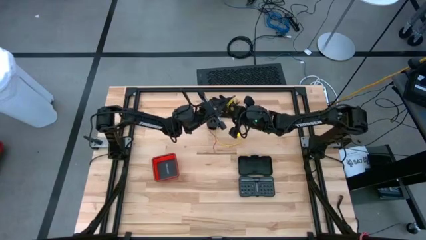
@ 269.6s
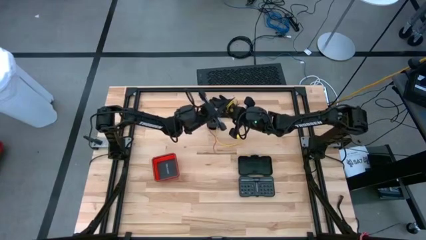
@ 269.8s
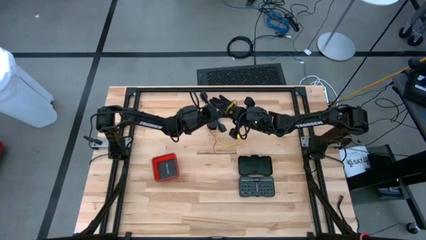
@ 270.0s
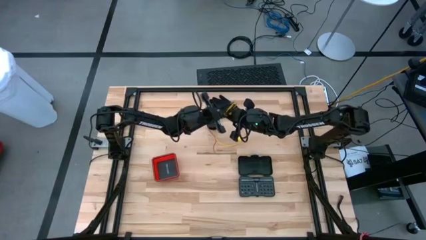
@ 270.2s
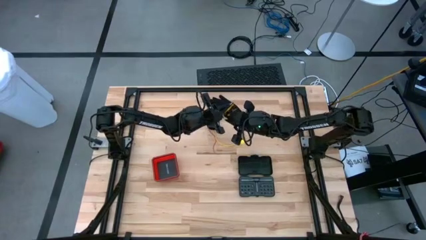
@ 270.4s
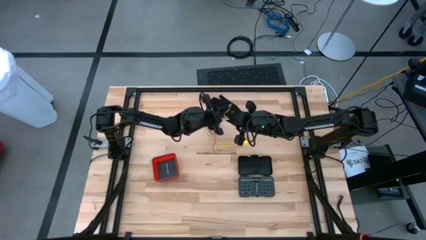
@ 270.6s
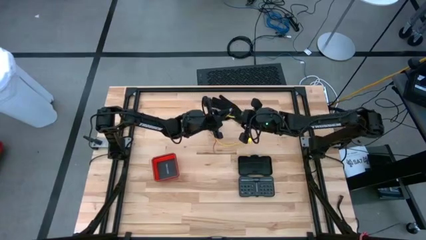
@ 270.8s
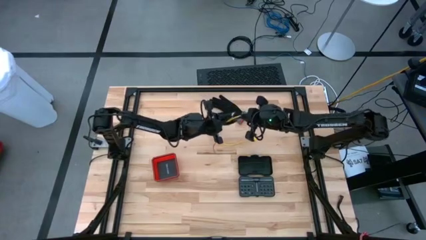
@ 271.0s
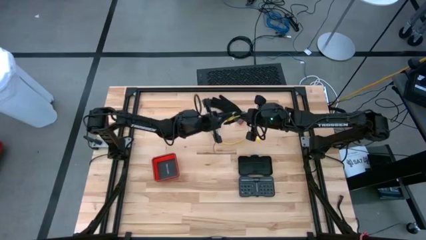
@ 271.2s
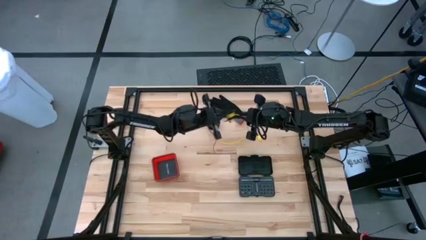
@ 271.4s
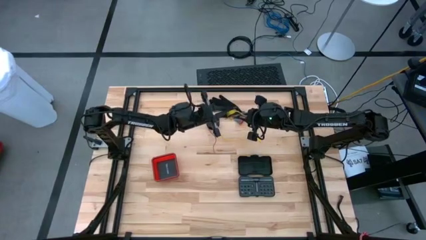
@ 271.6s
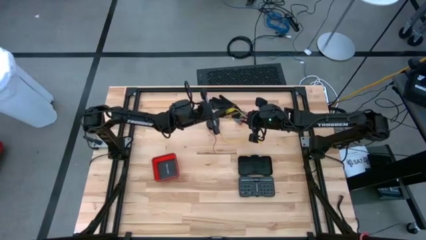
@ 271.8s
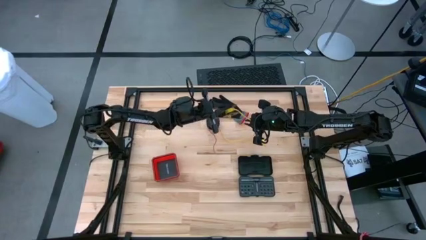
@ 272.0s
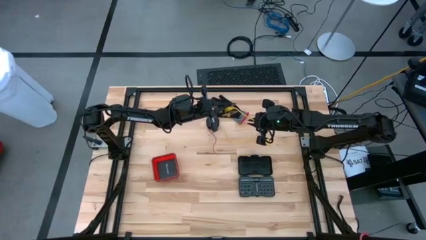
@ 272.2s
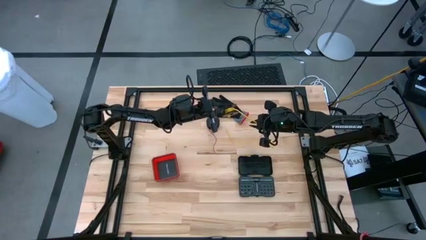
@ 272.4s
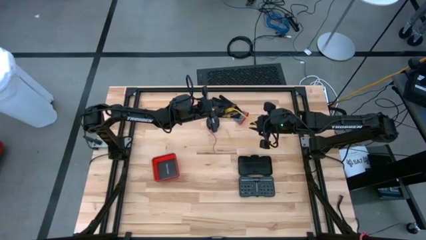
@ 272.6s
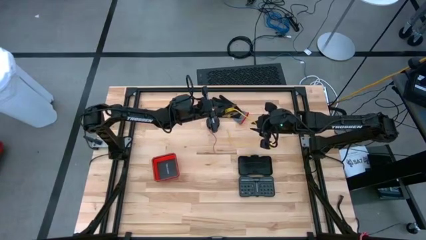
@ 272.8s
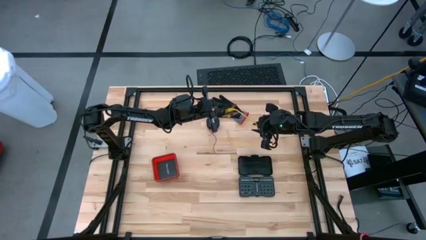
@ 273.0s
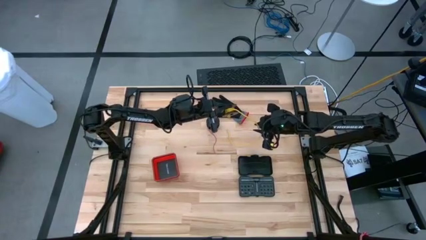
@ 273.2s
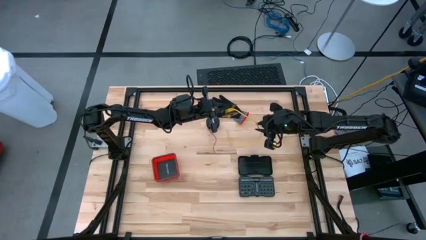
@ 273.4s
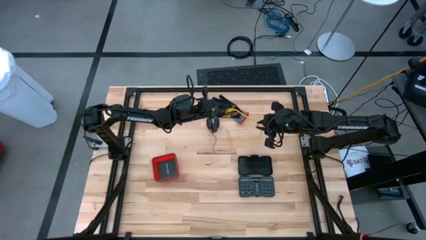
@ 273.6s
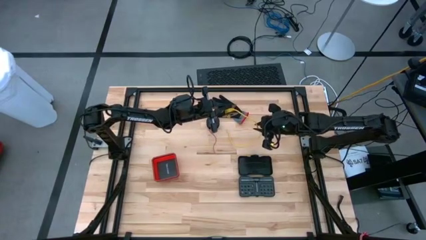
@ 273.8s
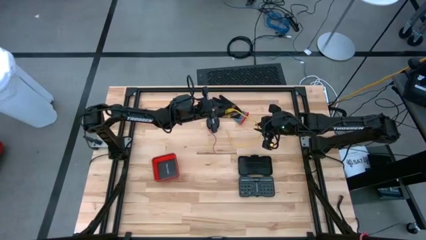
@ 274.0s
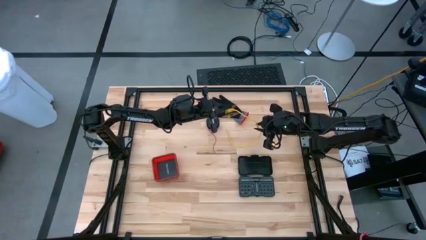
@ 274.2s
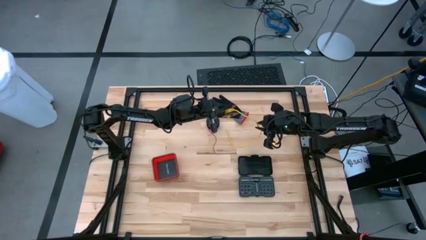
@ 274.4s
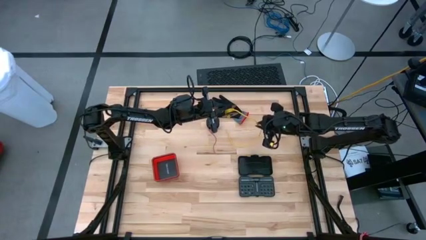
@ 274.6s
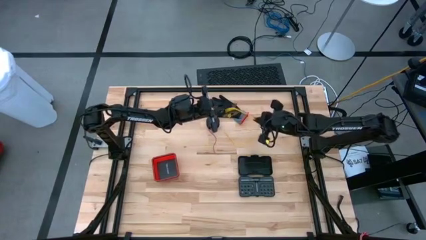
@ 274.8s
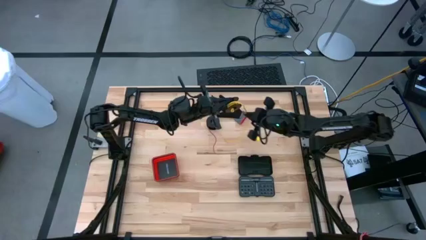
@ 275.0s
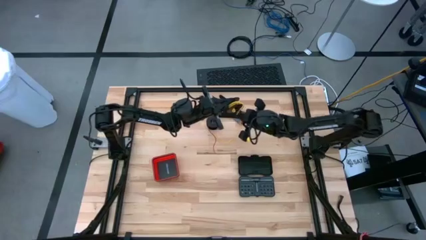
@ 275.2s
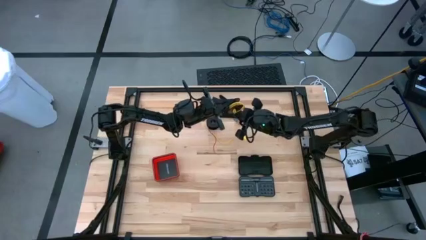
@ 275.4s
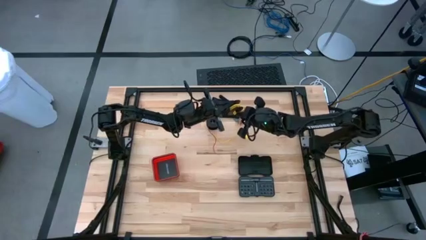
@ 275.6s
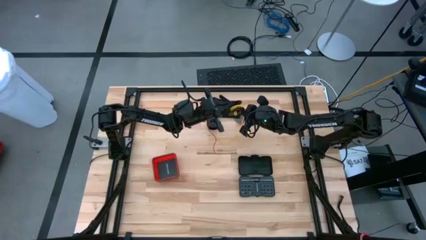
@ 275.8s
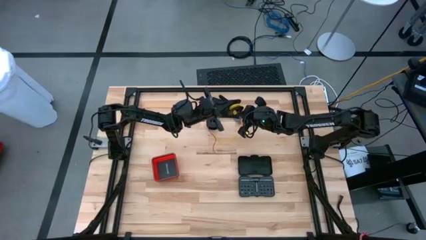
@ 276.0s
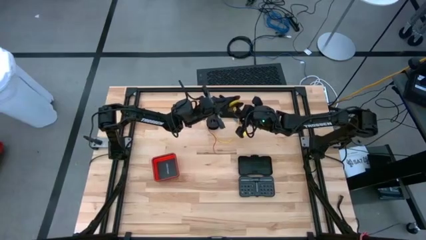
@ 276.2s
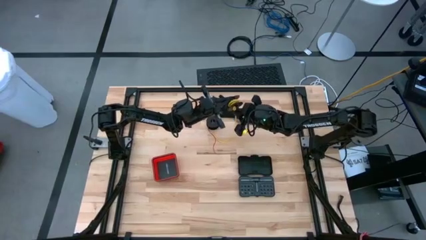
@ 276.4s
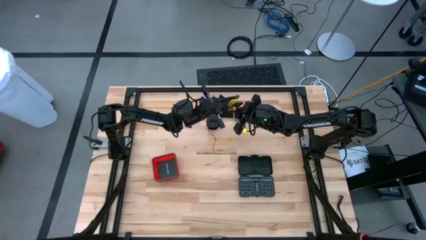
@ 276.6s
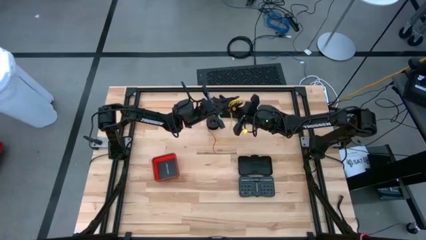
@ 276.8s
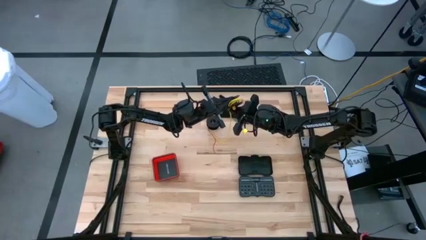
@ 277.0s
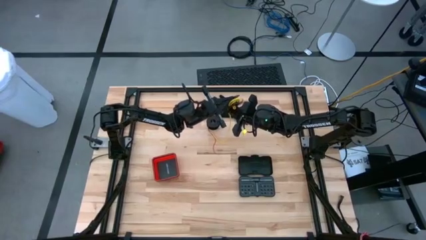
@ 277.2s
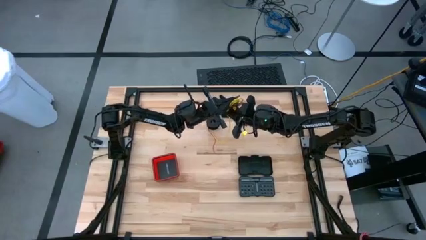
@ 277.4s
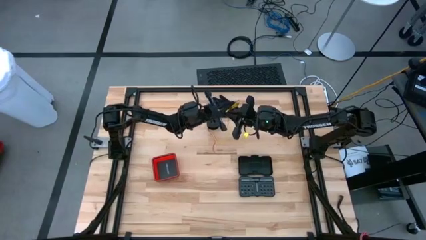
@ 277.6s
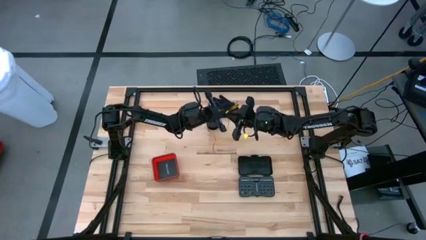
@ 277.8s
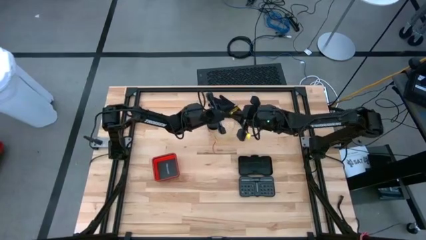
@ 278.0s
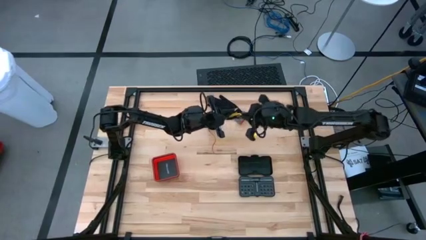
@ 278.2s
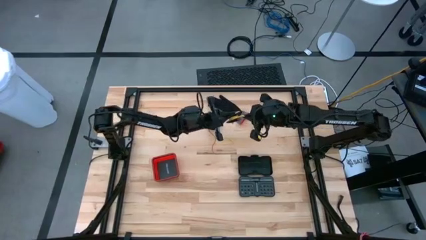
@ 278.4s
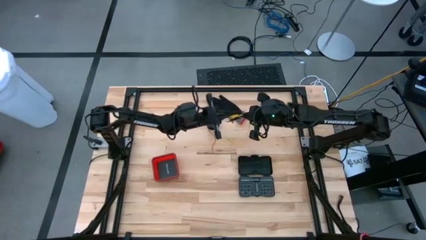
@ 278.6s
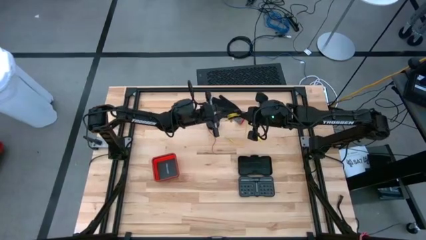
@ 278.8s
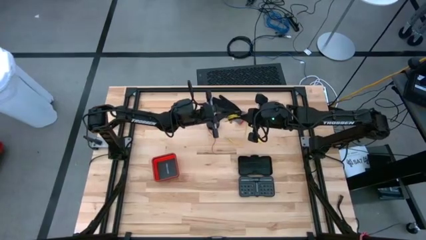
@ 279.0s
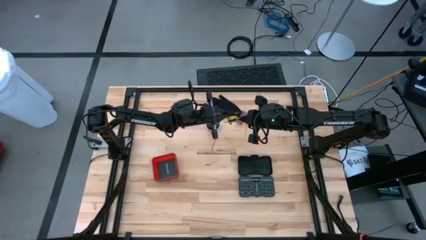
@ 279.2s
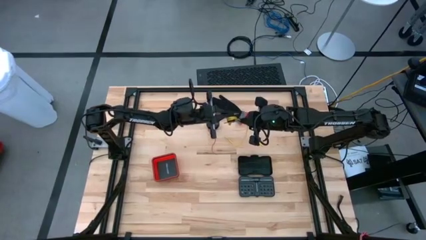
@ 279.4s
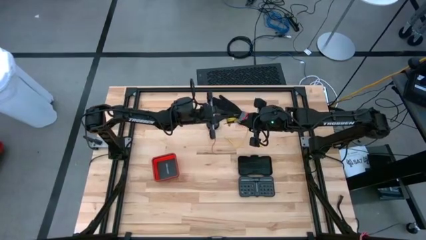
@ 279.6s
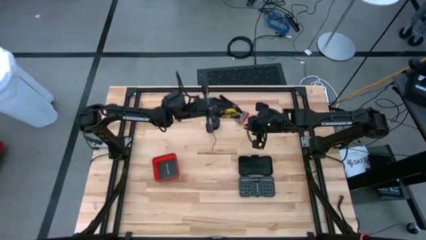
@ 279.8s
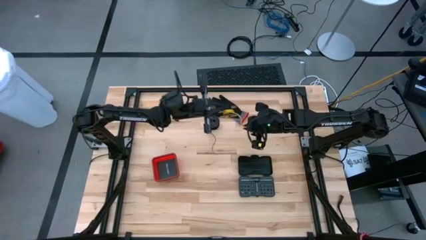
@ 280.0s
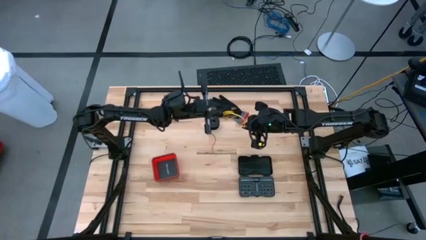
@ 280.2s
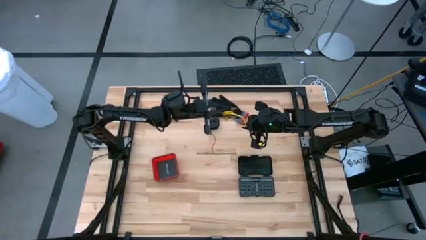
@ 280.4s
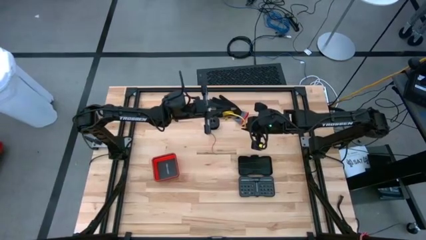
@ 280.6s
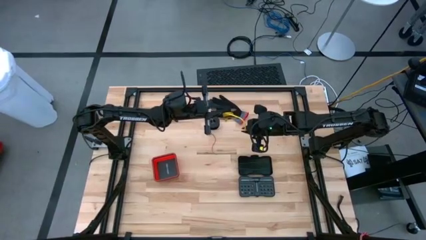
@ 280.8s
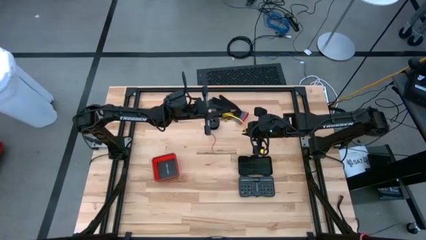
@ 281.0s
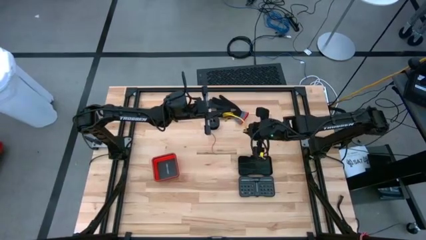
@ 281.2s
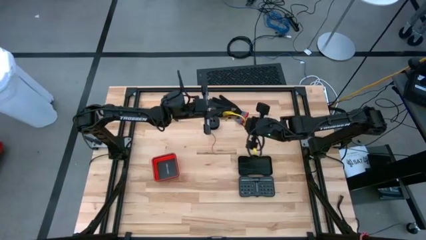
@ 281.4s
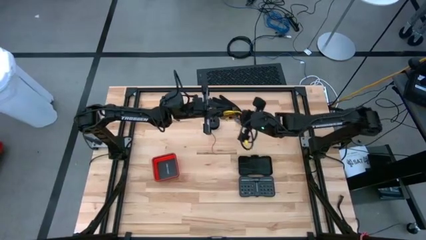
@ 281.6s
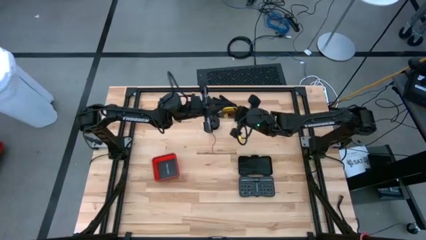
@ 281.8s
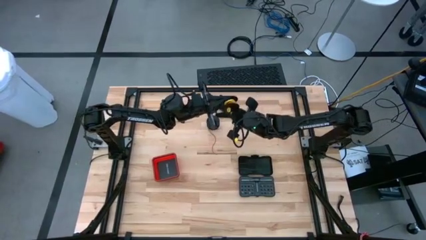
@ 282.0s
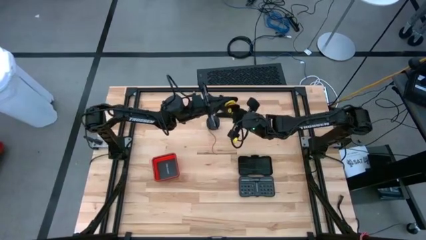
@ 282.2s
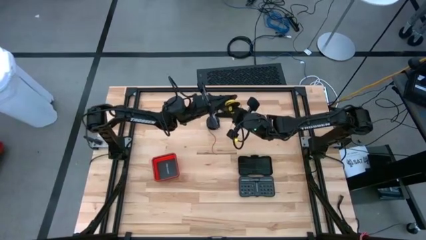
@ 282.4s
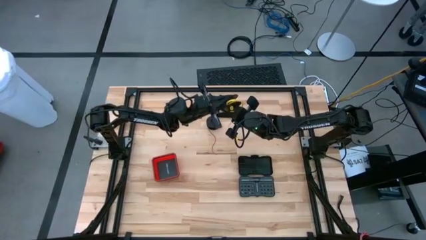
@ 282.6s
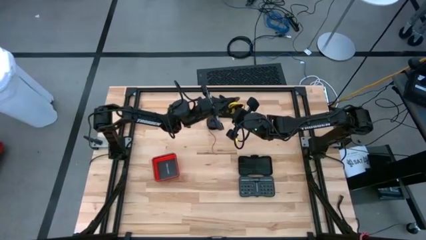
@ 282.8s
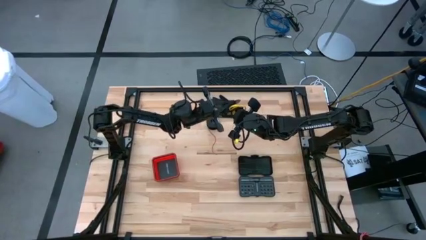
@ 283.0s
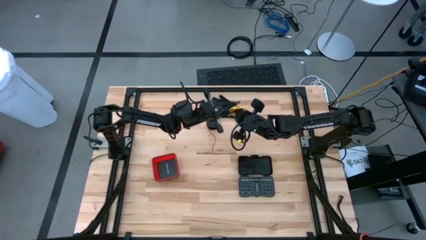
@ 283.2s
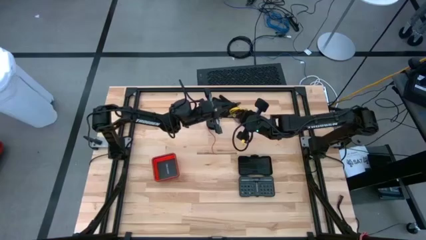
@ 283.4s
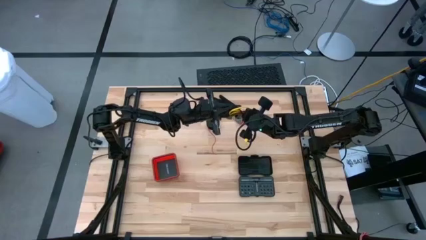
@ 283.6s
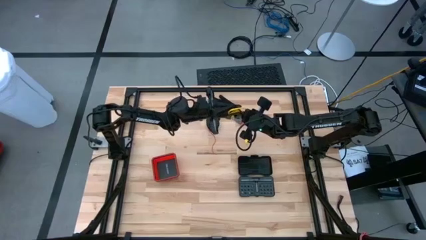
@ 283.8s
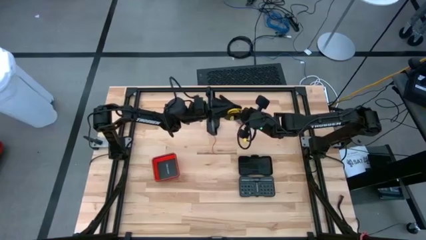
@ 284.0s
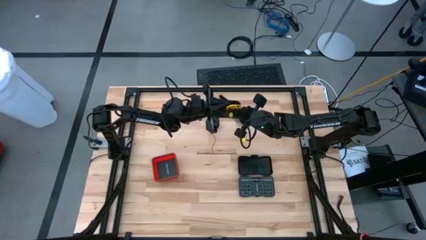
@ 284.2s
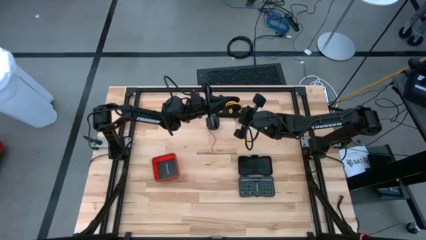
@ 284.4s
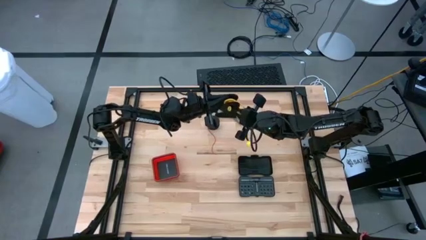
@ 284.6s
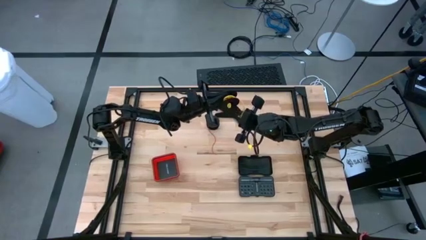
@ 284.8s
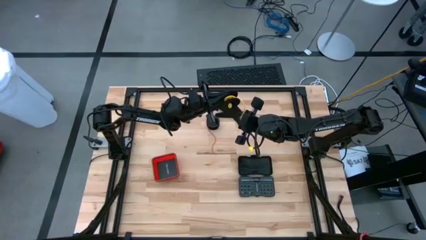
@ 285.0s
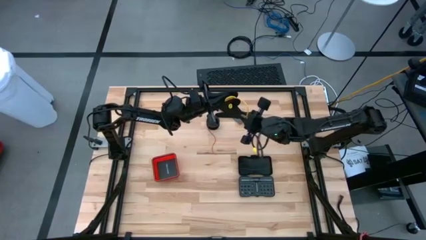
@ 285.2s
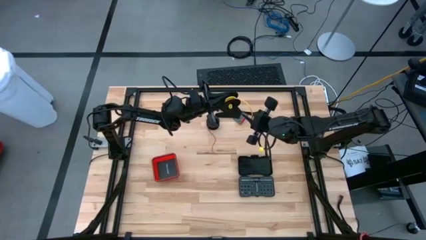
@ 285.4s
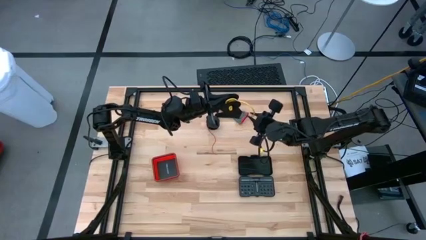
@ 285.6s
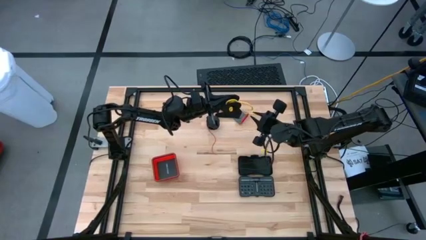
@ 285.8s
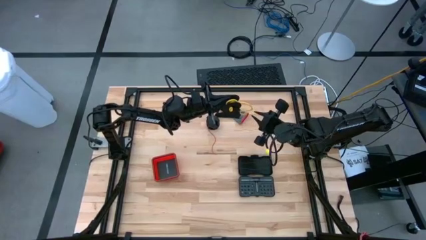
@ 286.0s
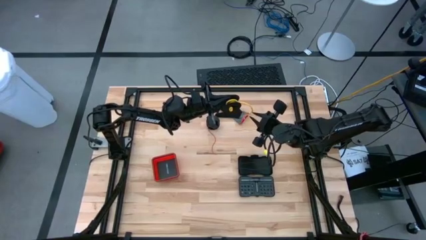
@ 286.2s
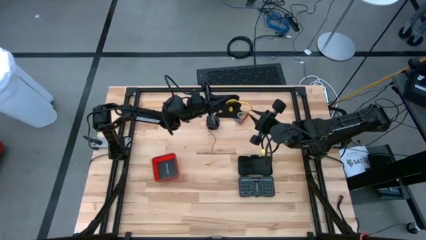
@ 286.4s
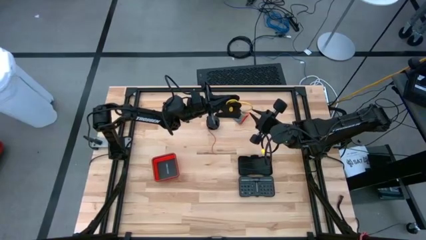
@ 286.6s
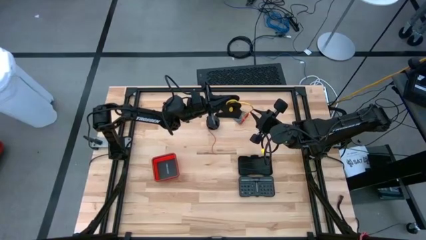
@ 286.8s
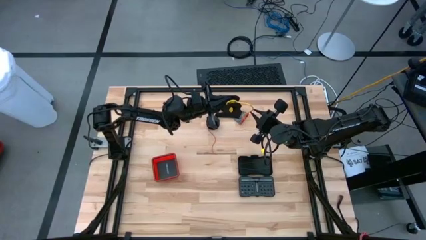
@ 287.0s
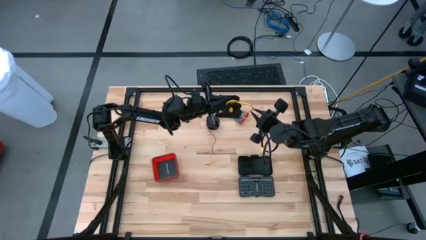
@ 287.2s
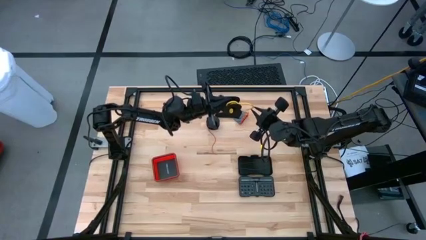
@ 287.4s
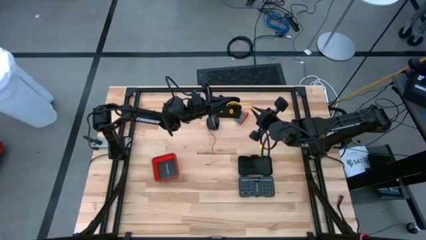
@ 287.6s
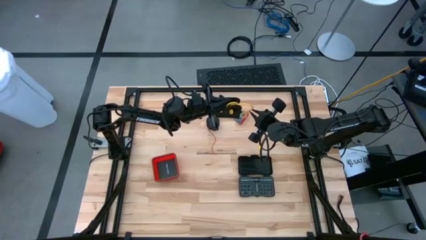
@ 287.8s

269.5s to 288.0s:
Task: Coil cords
Coil the yellow wire onto the spool
